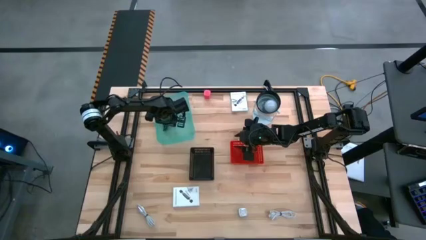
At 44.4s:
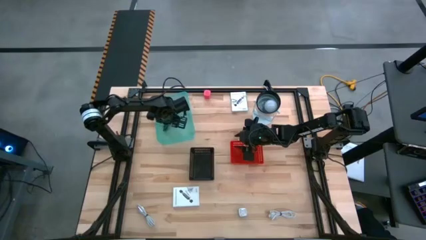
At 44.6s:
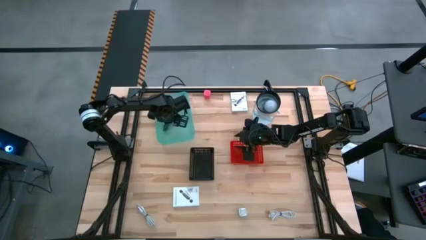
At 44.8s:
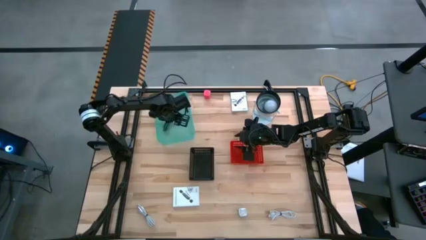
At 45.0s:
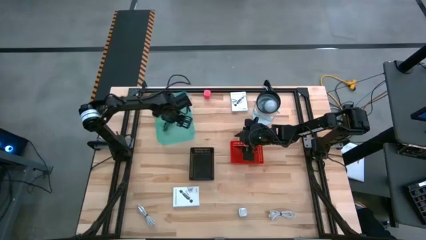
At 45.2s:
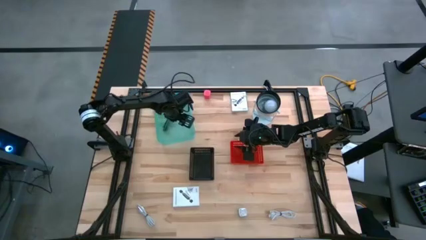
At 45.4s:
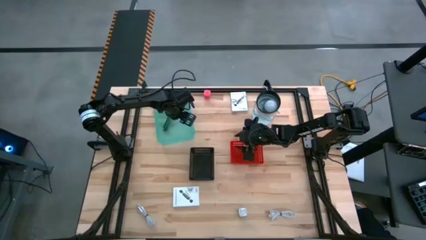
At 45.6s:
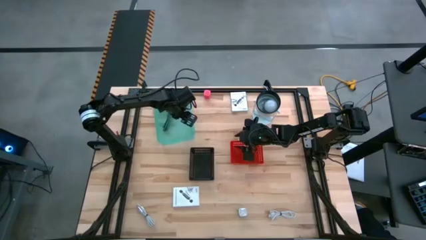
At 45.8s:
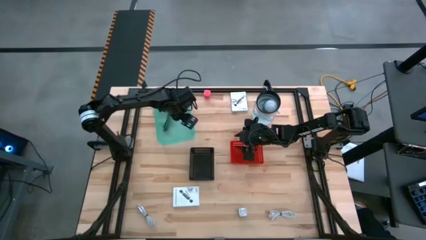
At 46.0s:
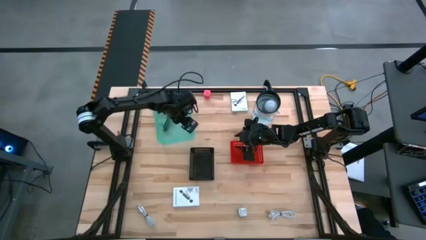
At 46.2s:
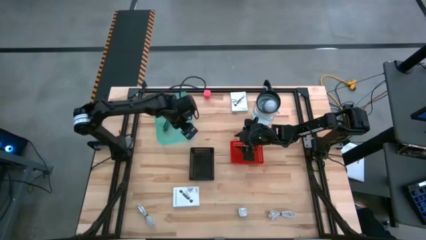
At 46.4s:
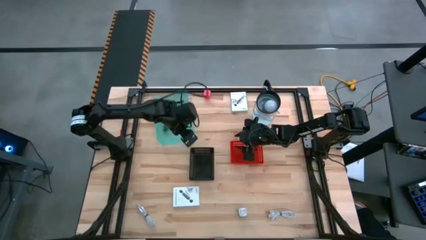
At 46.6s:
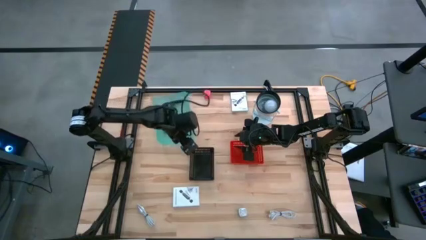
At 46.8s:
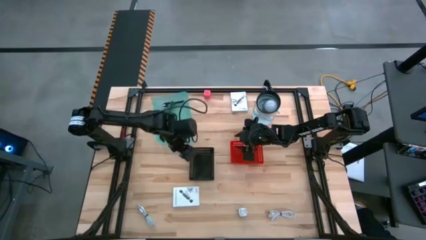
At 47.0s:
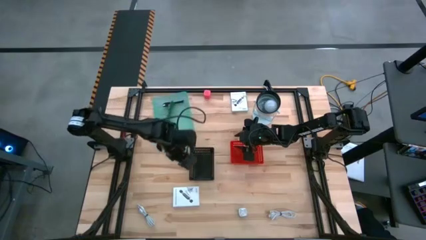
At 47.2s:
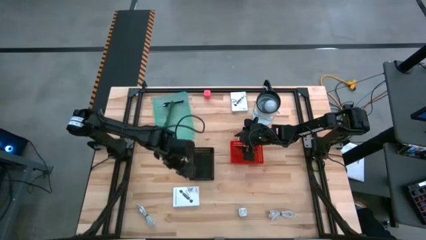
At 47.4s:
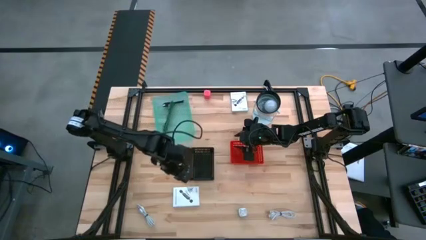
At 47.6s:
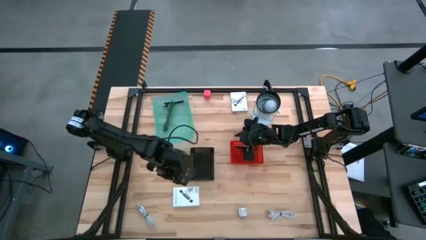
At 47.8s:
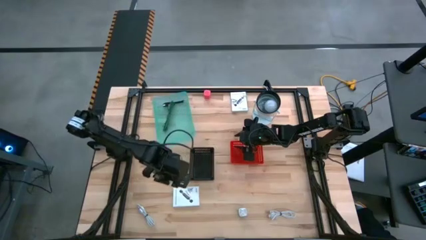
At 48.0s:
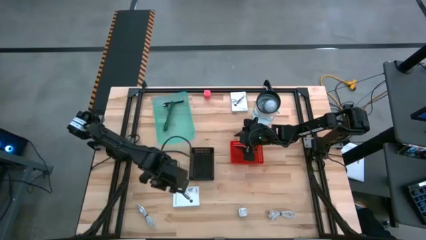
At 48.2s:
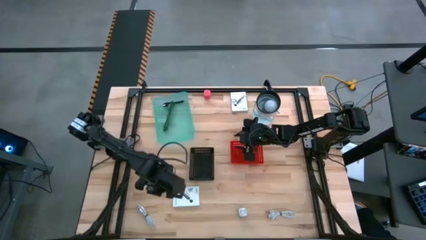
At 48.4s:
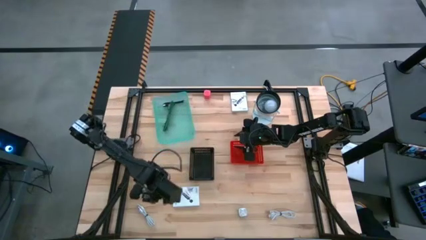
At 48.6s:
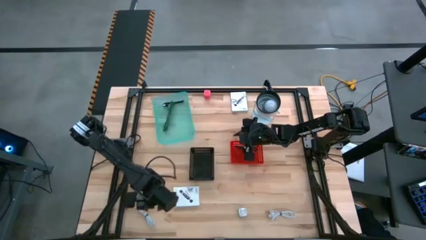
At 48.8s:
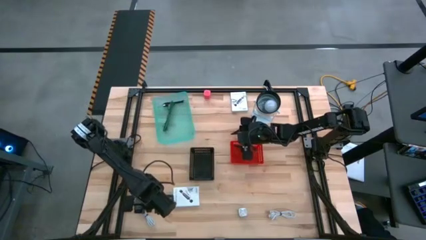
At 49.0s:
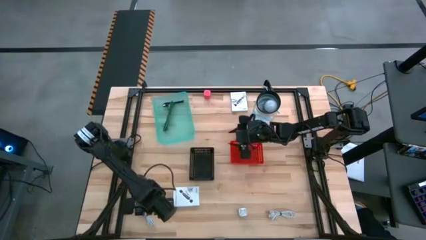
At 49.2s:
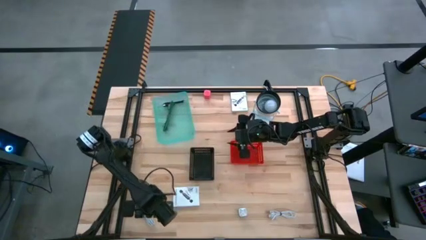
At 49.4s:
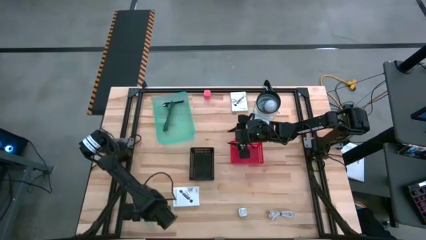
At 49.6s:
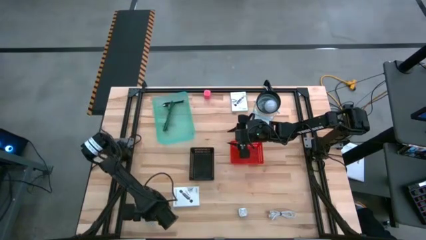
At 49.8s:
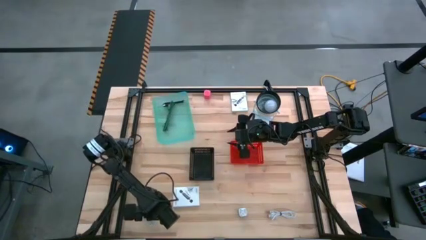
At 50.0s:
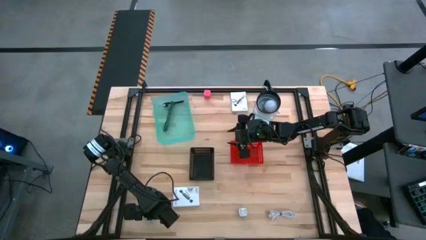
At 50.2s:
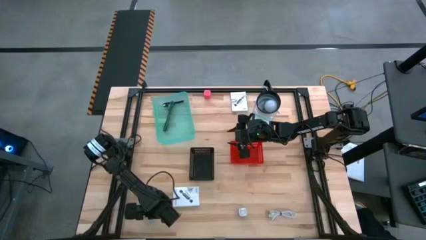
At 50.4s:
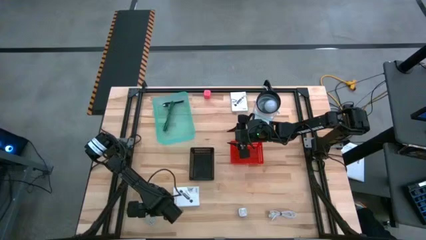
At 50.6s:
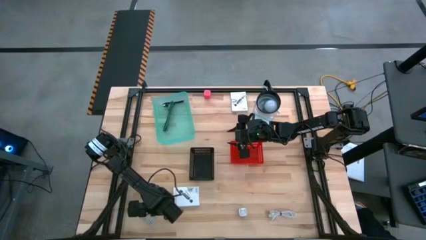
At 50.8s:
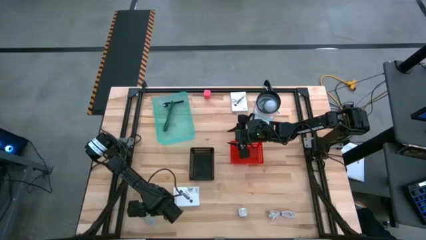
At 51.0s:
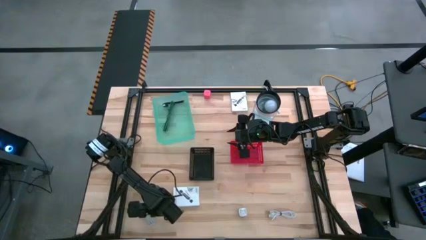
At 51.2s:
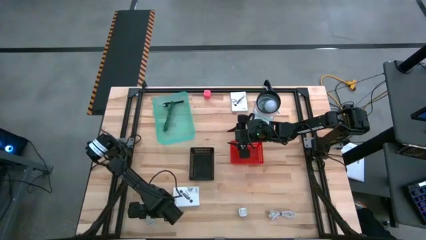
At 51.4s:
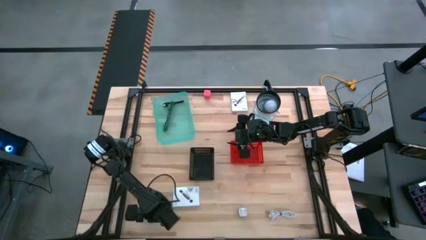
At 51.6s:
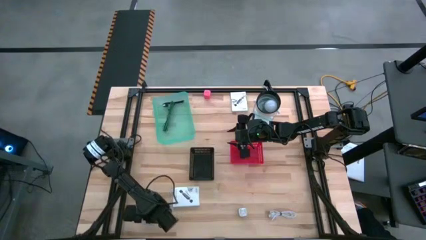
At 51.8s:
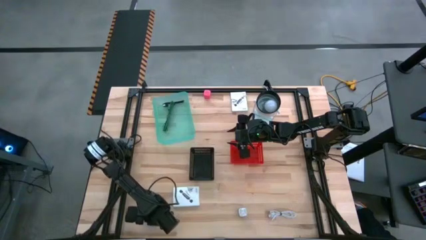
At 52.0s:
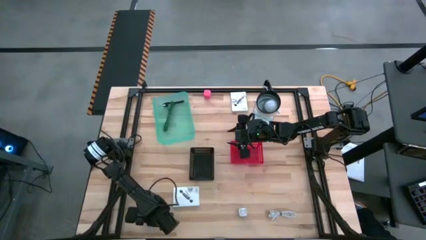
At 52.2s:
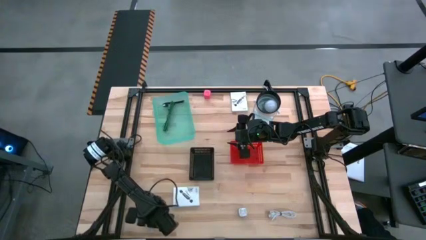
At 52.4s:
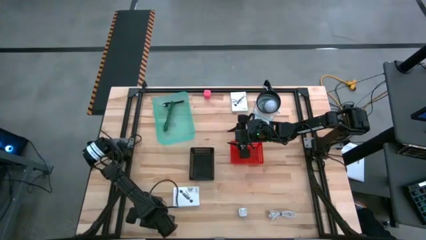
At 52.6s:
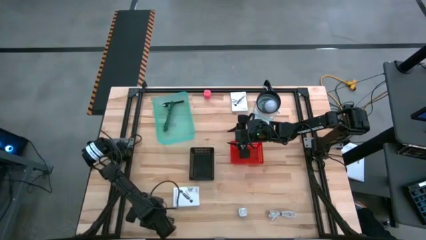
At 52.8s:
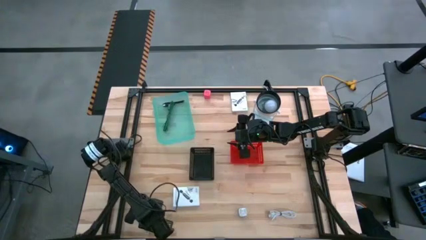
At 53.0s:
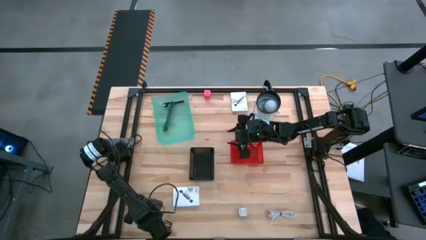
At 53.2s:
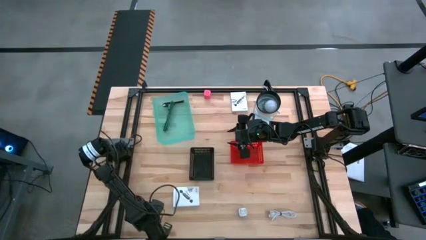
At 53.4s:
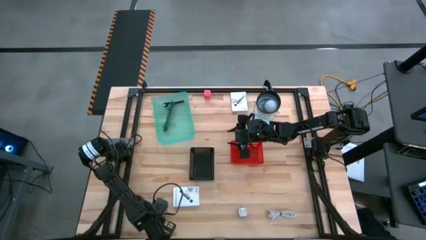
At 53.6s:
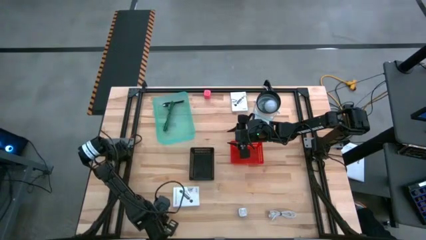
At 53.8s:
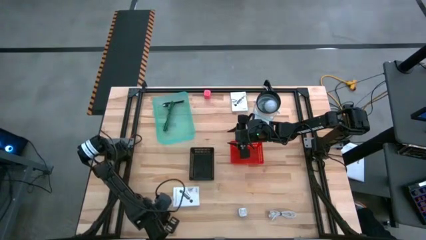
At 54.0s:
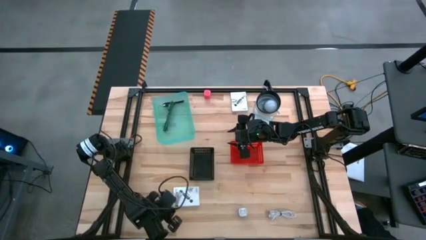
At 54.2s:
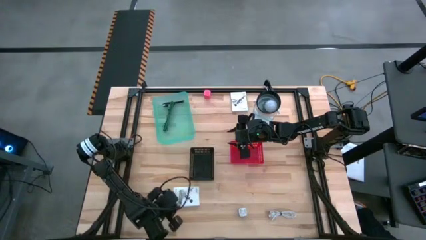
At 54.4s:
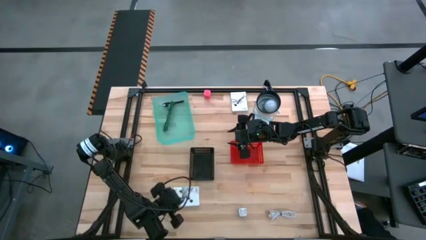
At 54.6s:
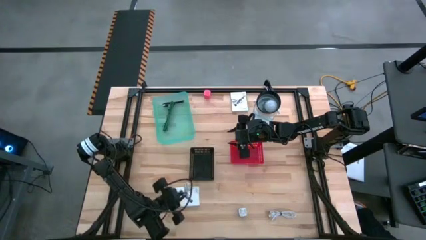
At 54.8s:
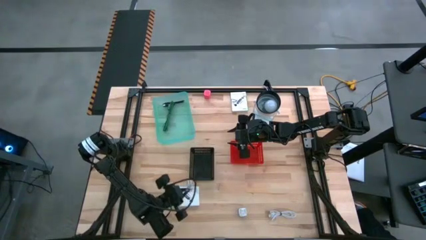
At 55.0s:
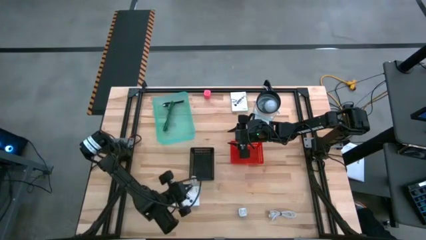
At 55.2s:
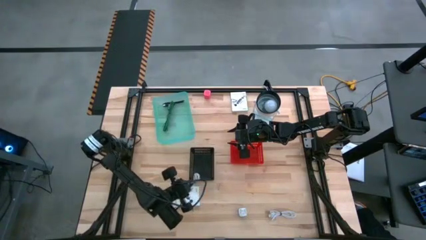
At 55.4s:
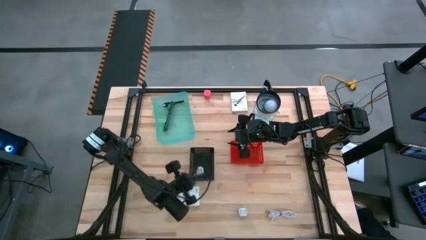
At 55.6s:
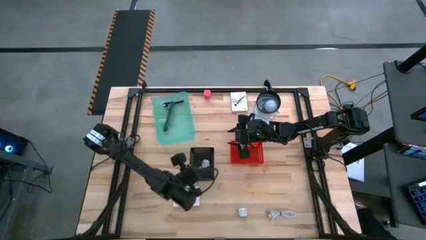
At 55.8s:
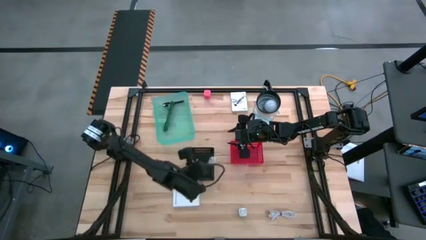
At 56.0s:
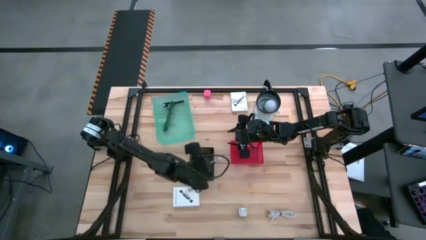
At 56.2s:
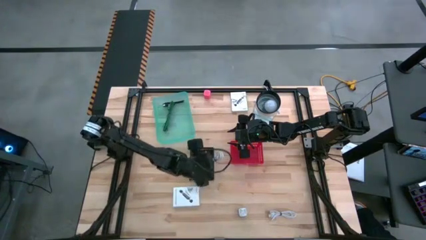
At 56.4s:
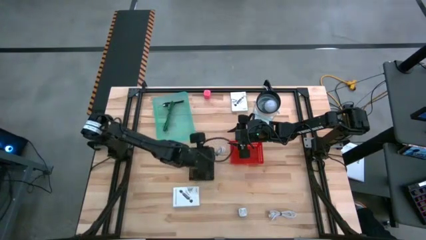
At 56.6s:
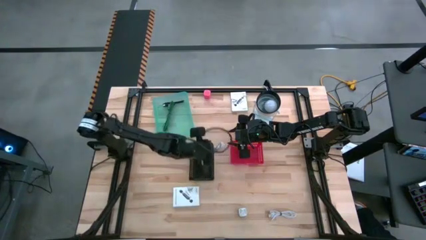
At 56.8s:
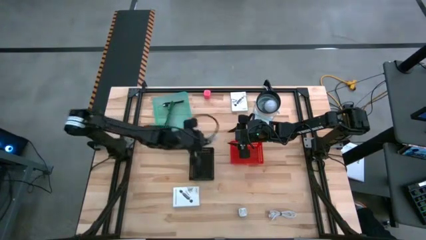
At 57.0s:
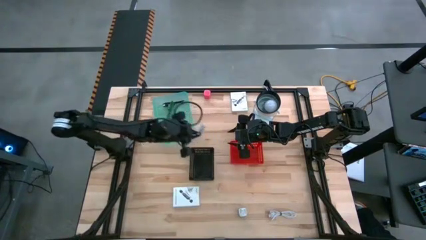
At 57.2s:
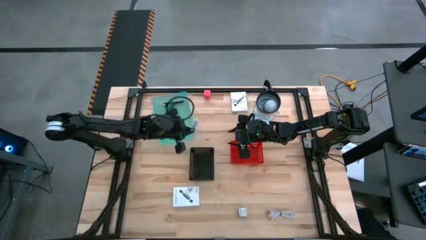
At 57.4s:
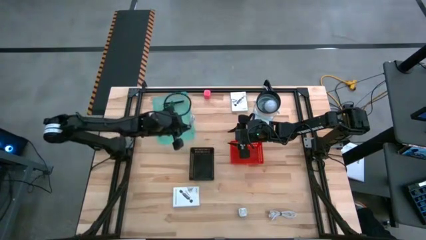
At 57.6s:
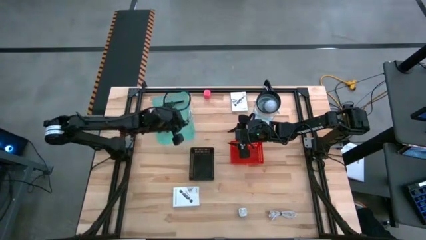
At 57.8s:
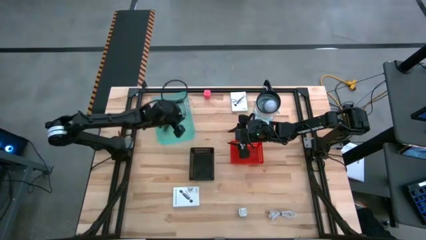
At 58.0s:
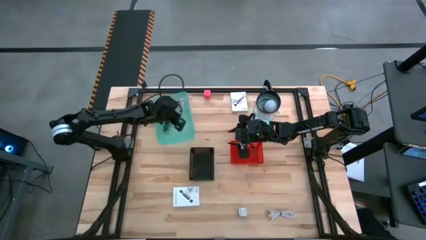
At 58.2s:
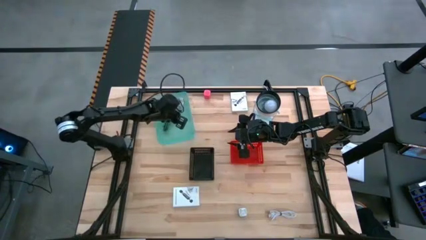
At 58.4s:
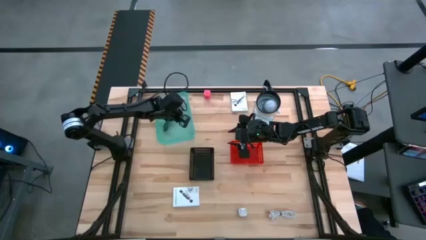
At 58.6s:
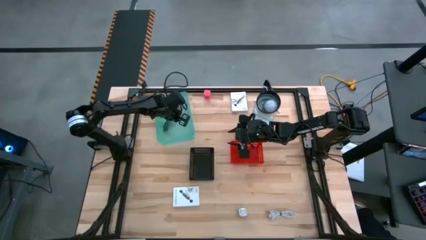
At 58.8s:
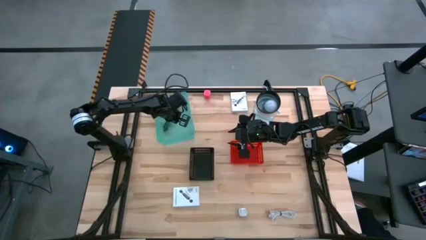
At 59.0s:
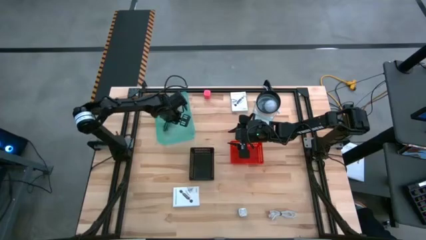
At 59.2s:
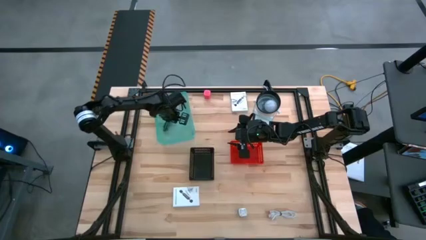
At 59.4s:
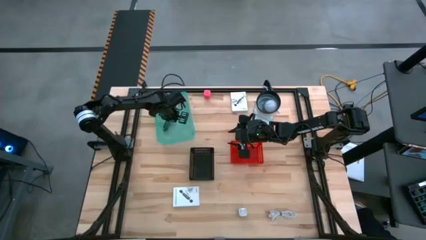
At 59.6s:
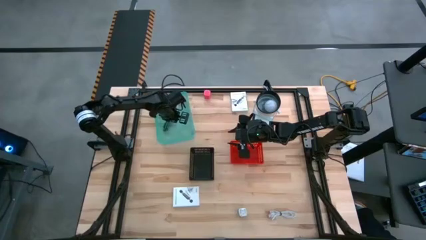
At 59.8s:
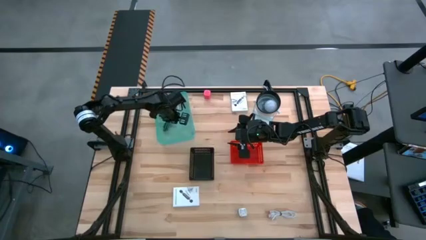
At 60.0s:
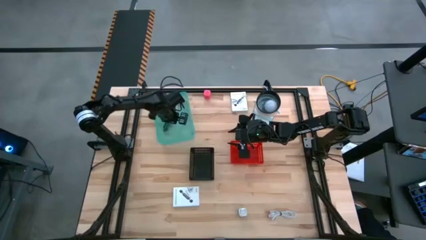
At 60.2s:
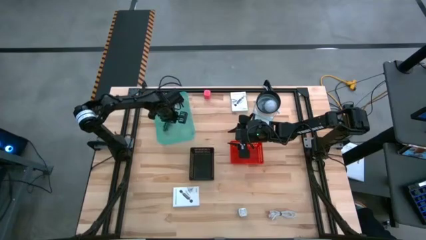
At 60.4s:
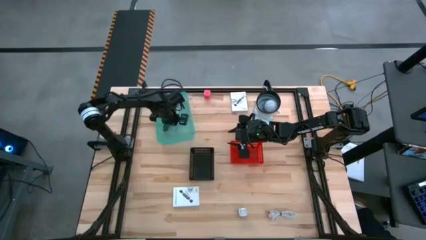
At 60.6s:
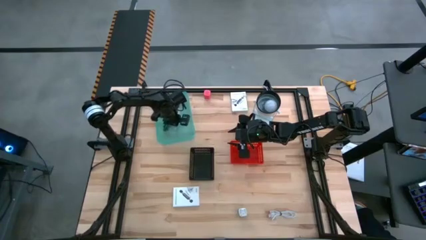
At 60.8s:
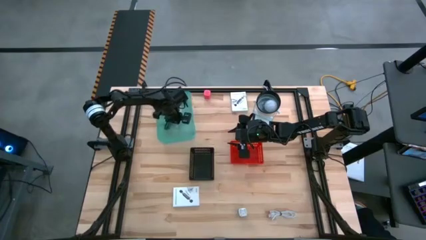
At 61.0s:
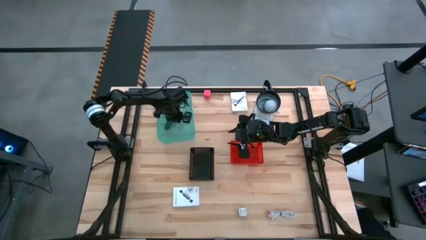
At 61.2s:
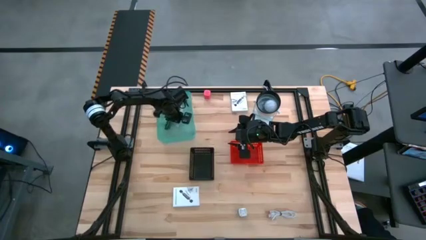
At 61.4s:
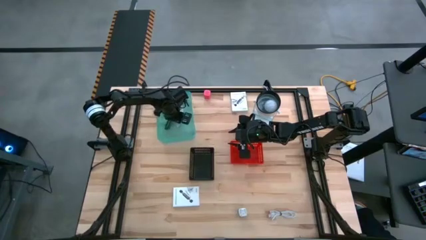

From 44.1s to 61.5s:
Task: Pick and place items into bin
Put the left white charger cable into the blue bin

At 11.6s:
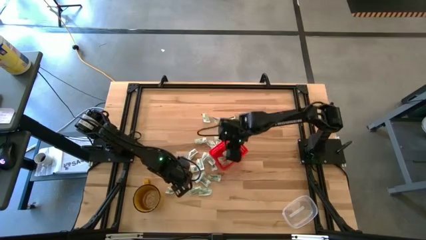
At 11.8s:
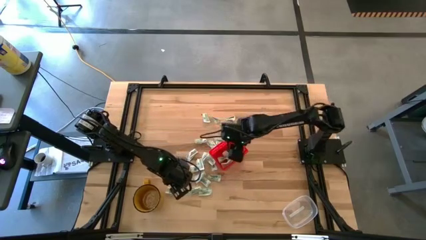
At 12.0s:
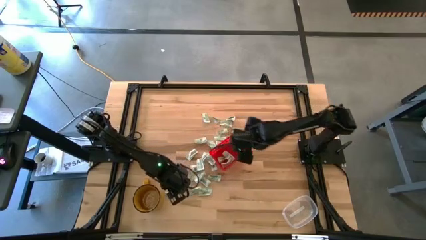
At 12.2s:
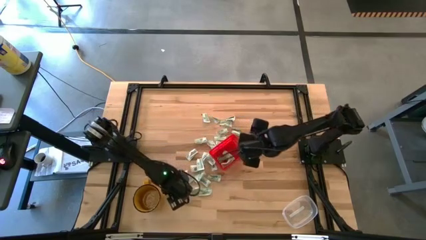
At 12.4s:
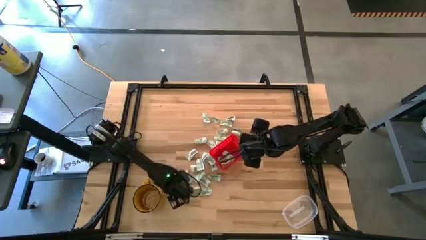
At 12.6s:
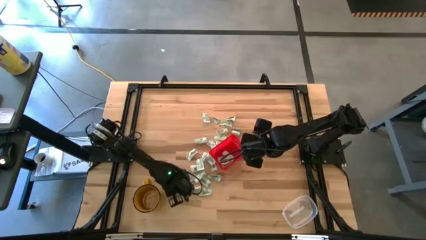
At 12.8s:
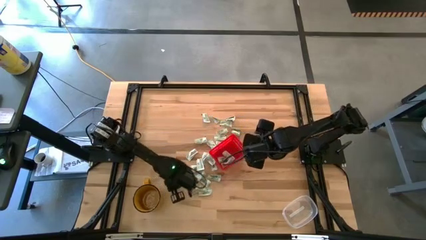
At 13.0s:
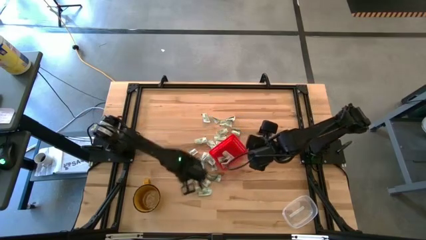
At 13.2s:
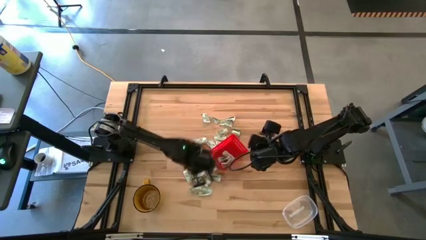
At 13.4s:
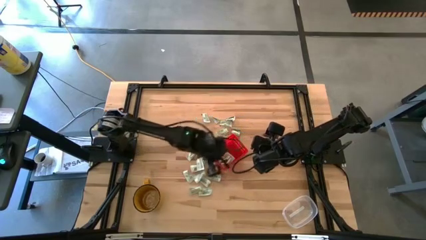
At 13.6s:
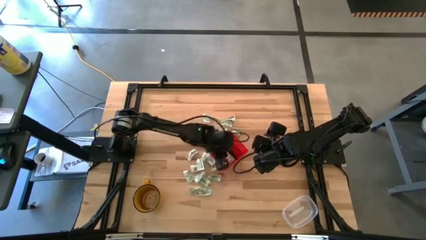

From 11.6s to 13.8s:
Task: Pick and place items into bin
Put the light green stevia packet into the red bin
